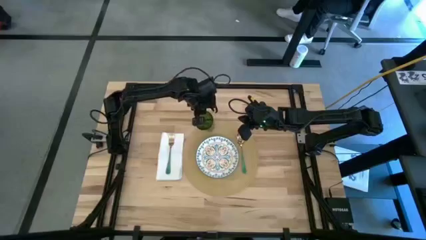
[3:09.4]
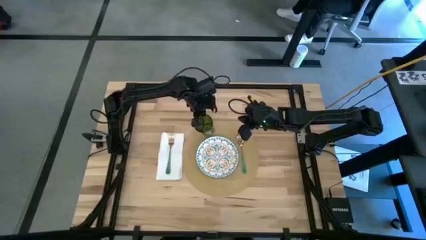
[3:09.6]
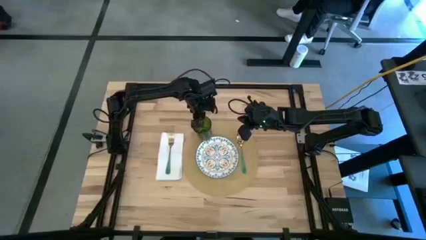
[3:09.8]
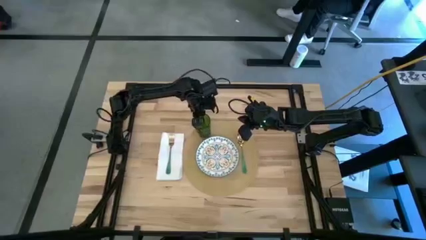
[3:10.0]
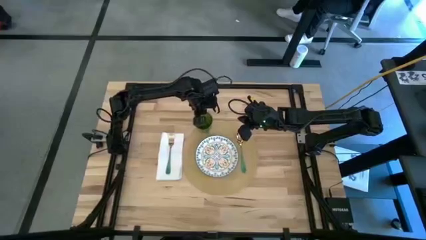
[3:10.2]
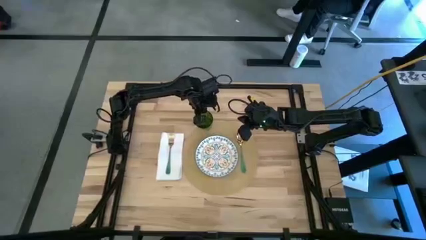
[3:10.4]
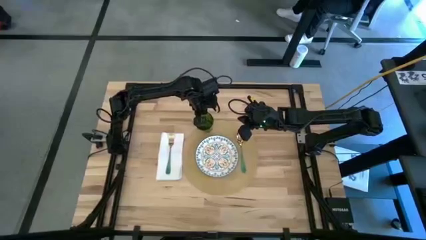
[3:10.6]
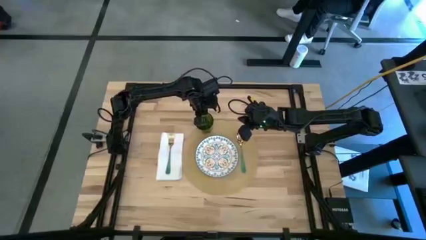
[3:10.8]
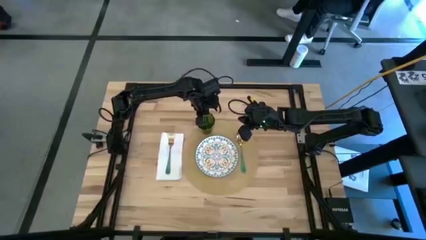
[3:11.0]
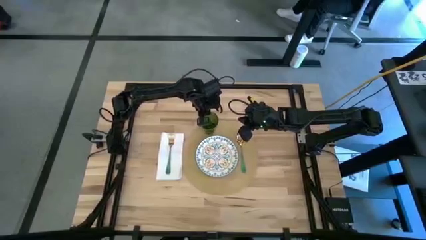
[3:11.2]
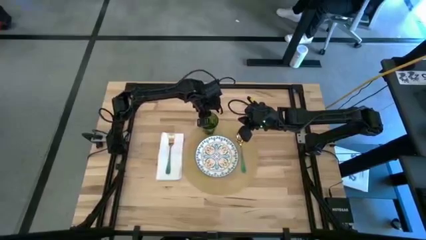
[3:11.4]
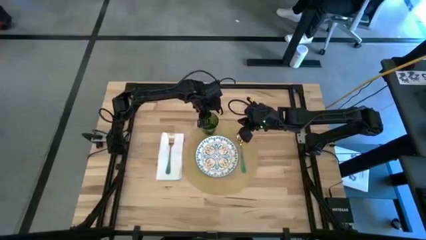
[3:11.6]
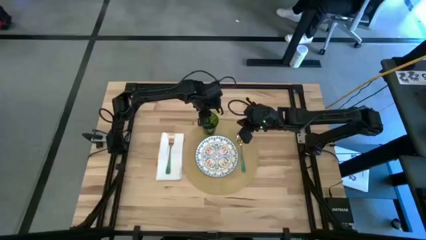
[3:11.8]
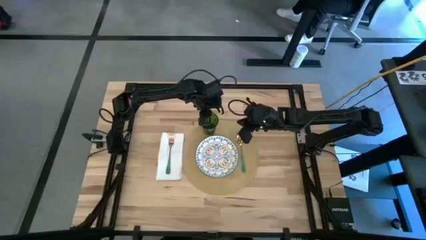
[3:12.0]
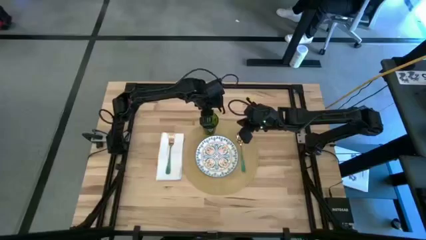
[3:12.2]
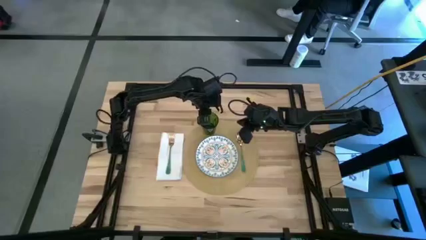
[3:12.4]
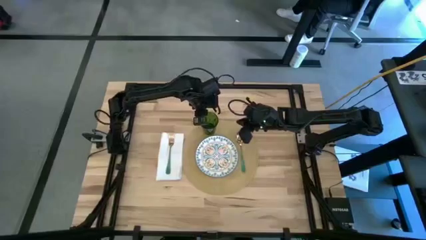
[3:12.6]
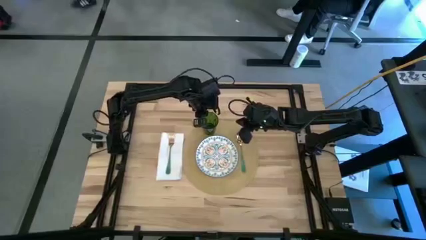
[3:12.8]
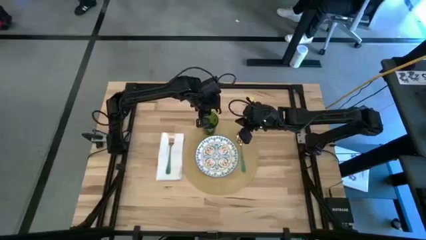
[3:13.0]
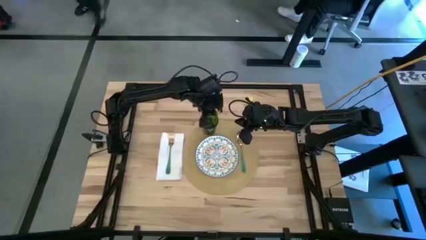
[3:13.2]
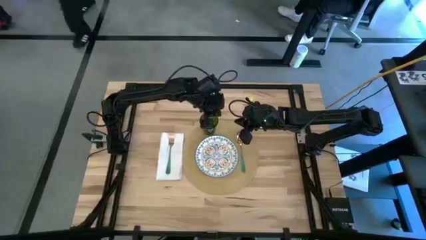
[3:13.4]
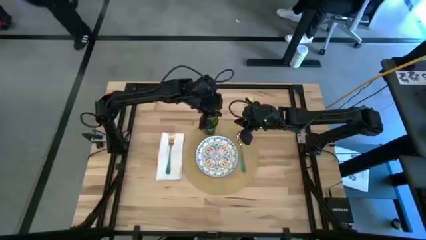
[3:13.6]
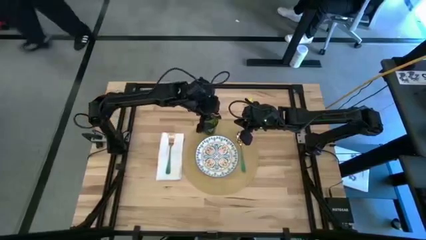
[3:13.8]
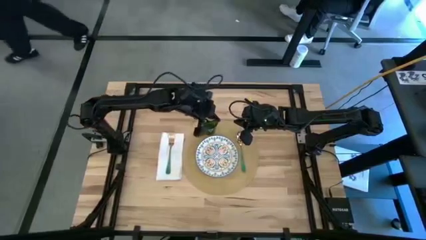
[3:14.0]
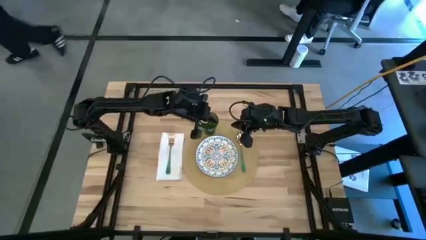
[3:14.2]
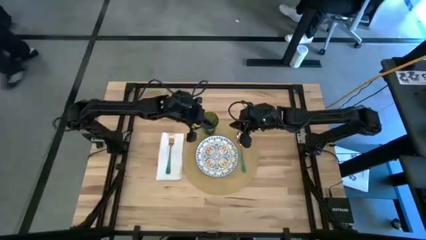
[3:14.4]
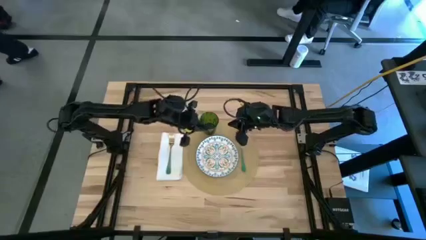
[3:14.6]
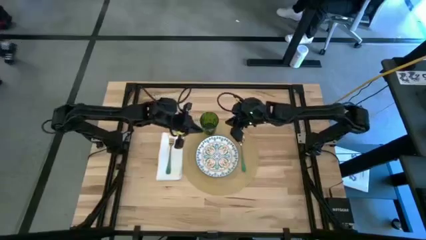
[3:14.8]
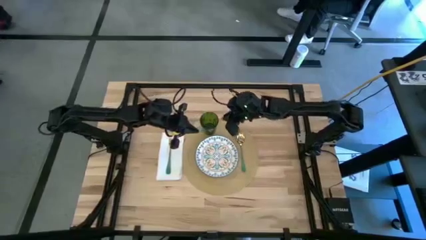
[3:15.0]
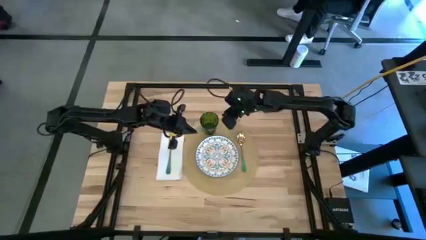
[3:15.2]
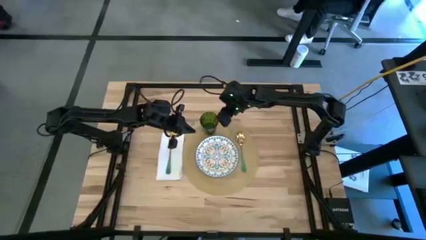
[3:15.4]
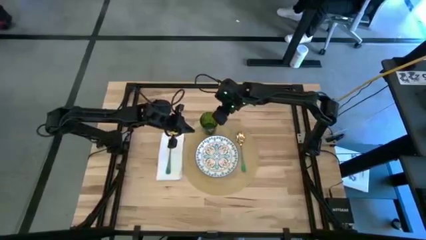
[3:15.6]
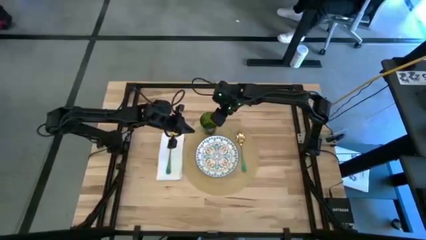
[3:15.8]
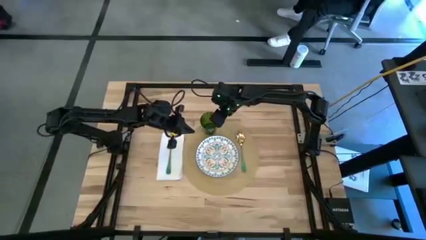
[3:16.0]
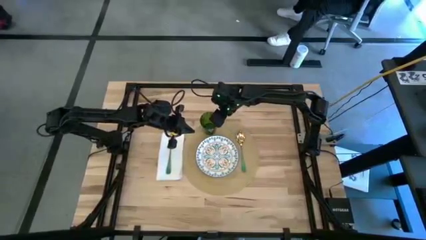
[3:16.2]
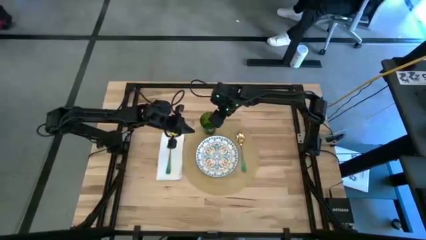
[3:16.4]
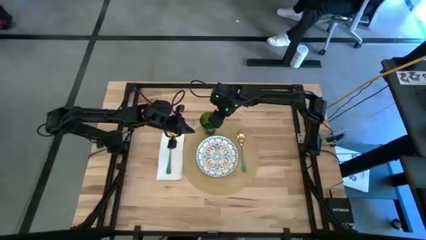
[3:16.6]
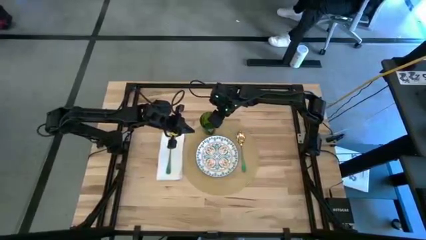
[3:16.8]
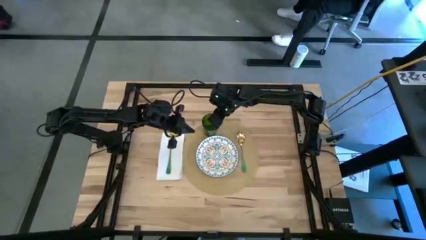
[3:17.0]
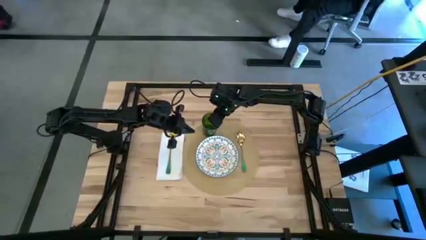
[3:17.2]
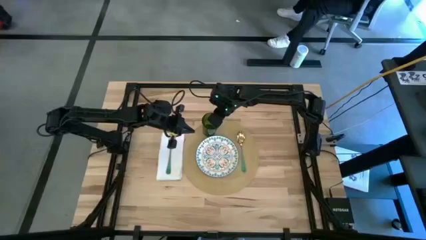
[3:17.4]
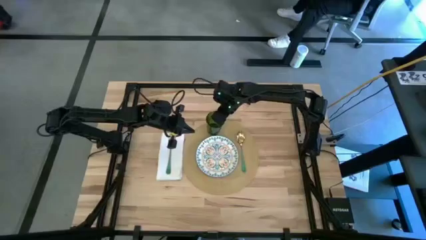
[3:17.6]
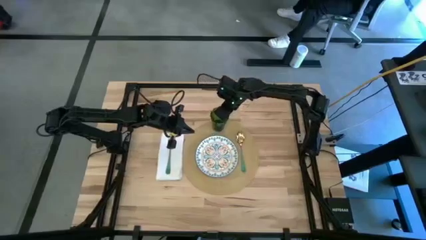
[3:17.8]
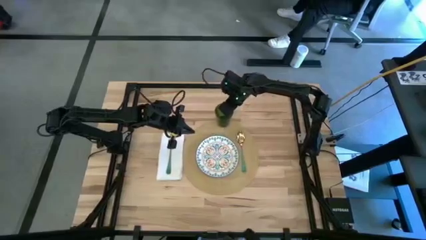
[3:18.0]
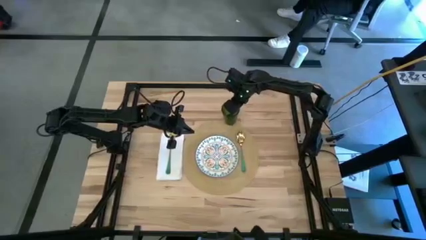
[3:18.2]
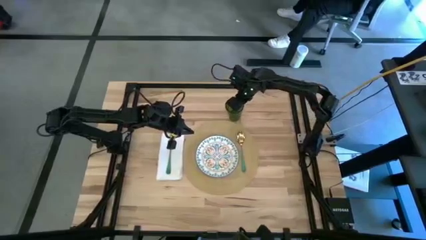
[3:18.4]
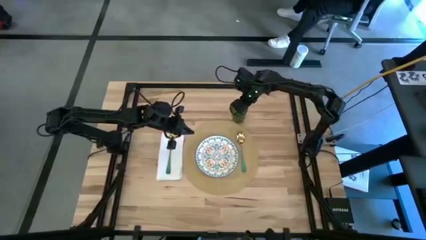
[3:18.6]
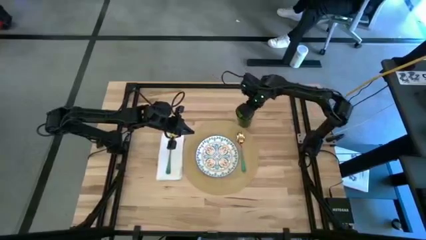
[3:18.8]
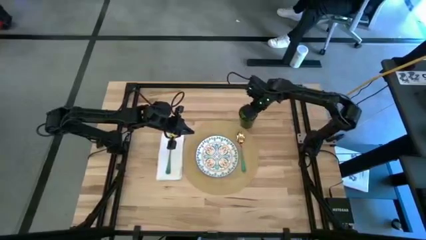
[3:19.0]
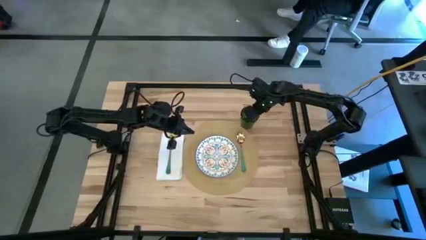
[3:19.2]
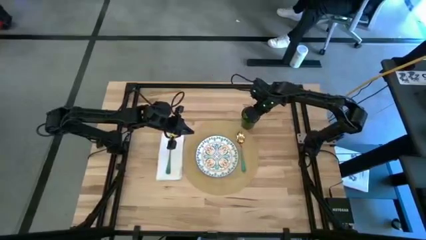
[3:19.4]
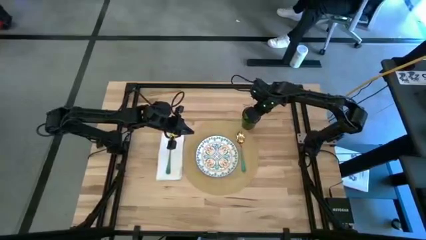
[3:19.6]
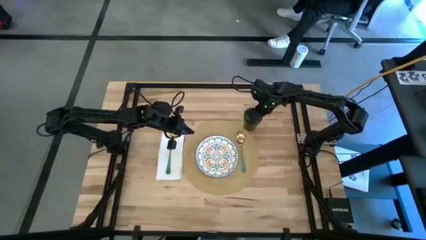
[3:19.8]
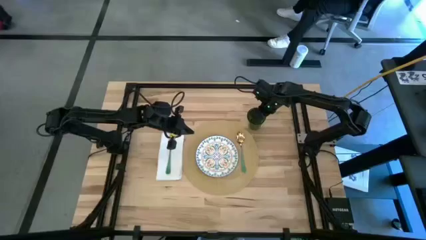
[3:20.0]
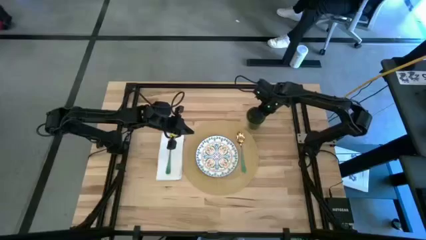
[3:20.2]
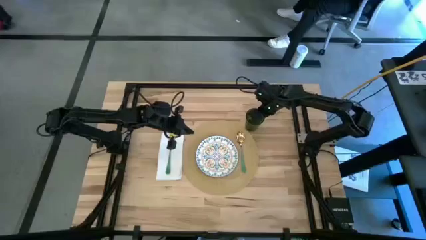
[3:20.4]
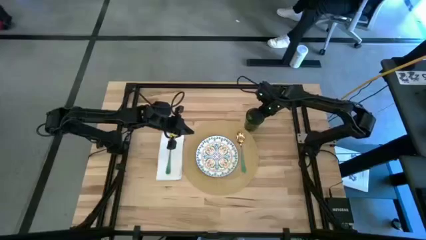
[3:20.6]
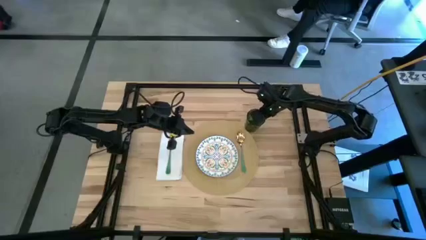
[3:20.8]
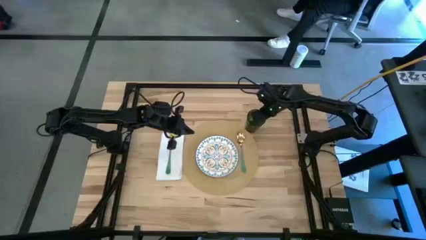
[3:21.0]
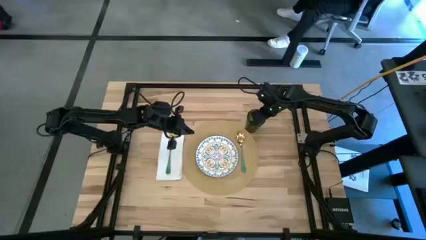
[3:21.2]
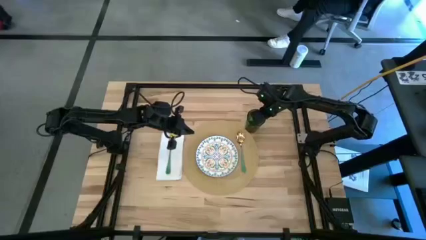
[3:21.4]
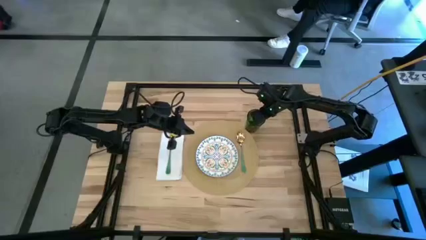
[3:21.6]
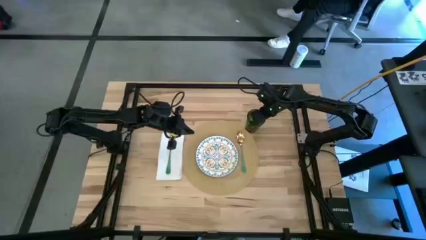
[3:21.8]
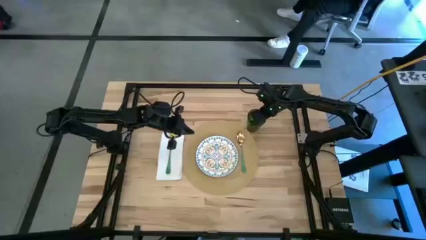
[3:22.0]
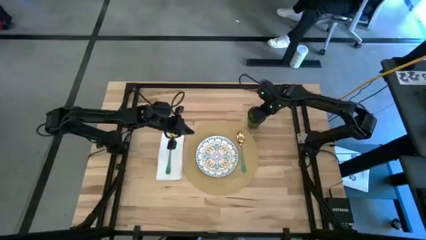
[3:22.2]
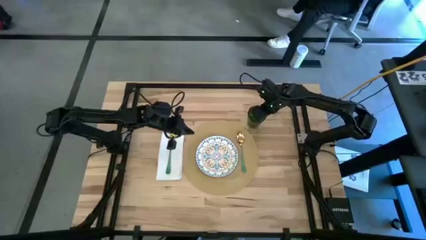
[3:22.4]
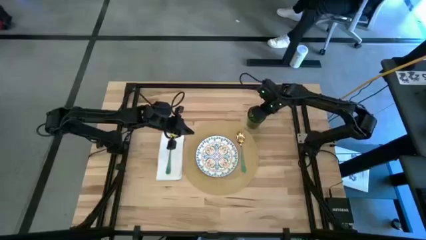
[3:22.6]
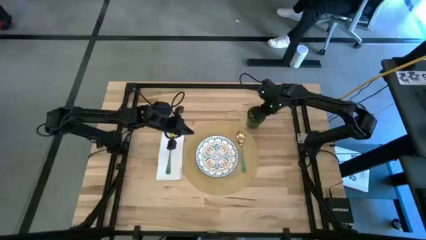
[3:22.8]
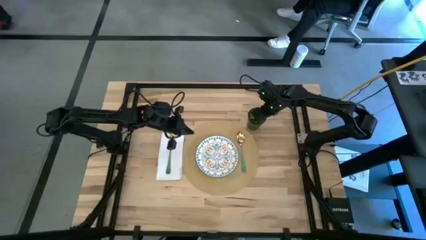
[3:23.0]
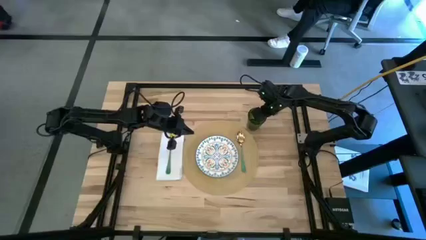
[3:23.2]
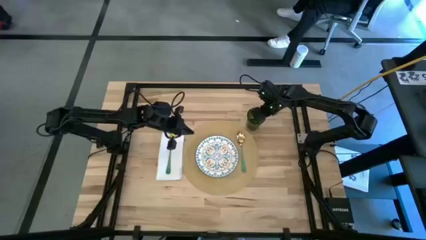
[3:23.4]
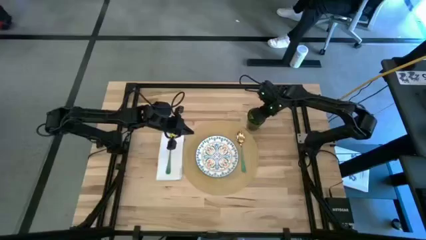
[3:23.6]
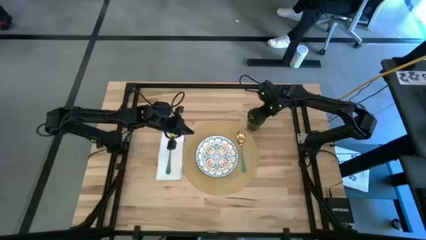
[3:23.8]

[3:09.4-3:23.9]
Task: Set table place
Put the green glass cup beside the brown placemat
